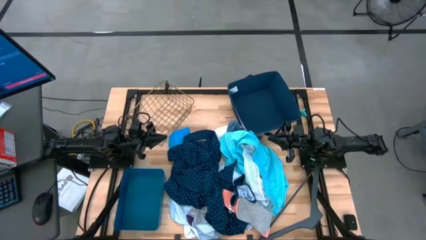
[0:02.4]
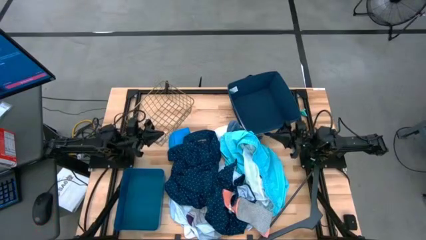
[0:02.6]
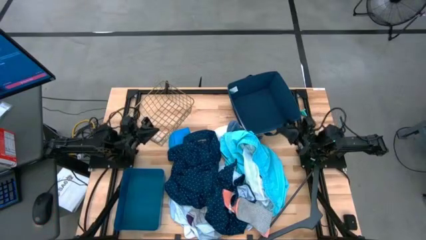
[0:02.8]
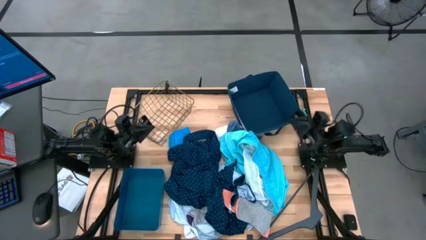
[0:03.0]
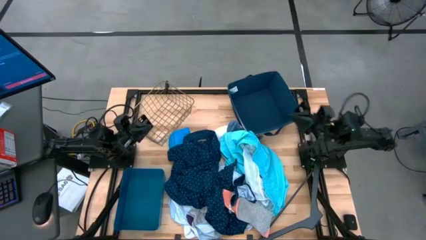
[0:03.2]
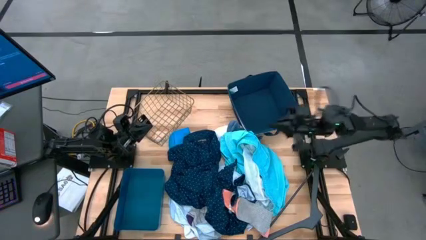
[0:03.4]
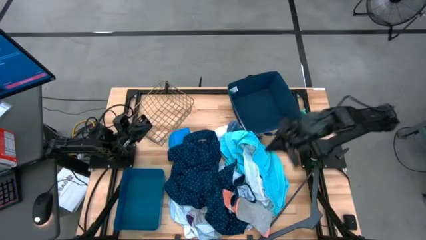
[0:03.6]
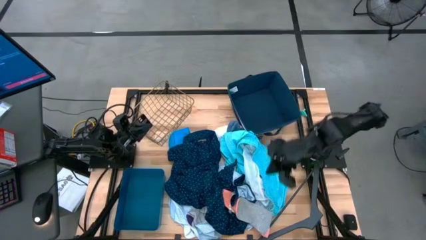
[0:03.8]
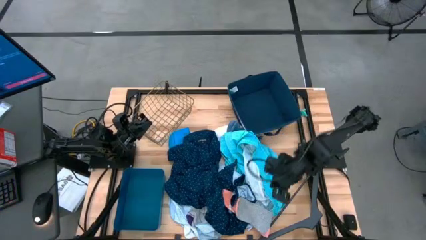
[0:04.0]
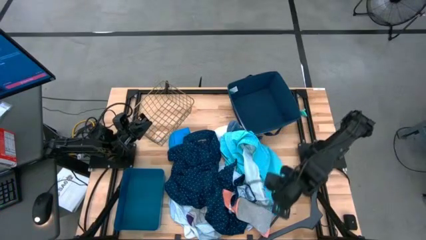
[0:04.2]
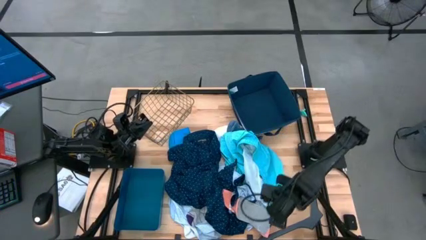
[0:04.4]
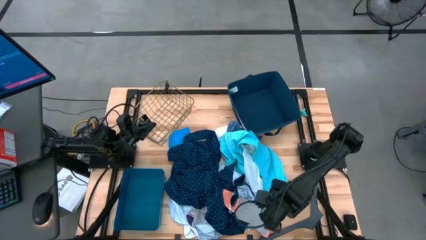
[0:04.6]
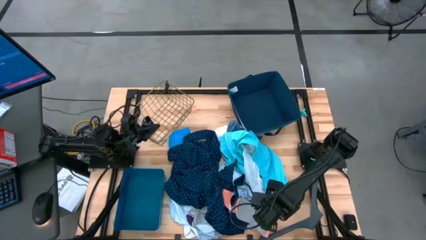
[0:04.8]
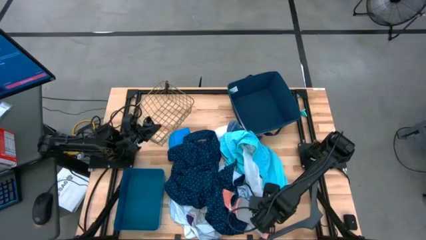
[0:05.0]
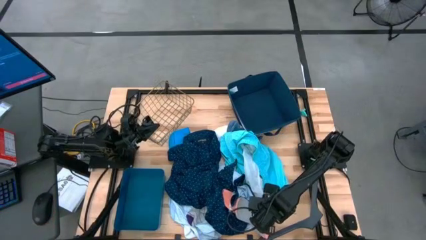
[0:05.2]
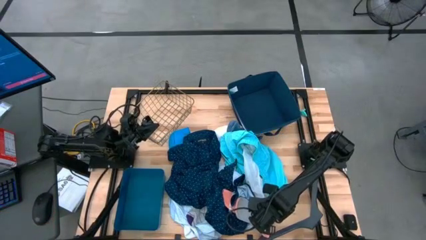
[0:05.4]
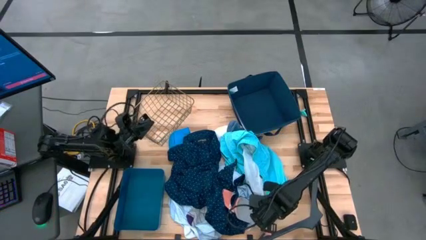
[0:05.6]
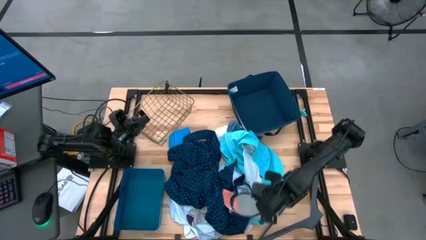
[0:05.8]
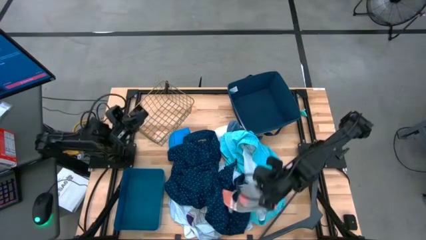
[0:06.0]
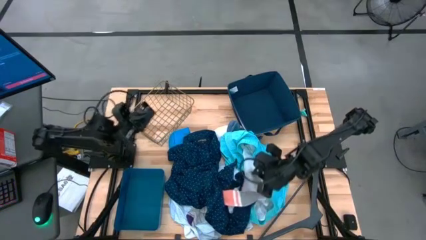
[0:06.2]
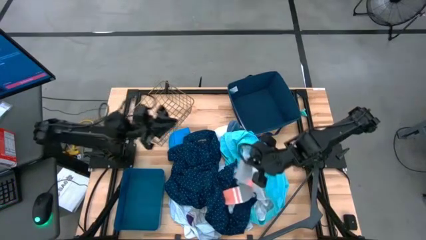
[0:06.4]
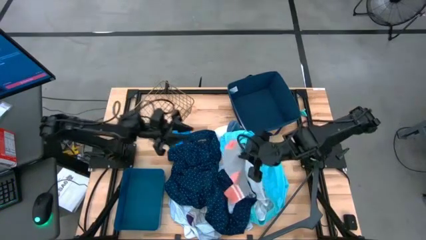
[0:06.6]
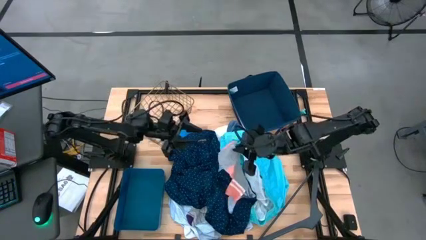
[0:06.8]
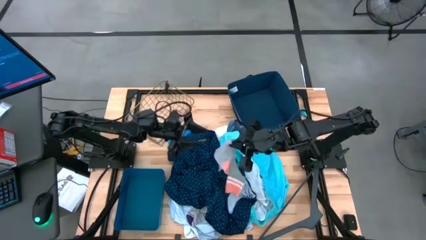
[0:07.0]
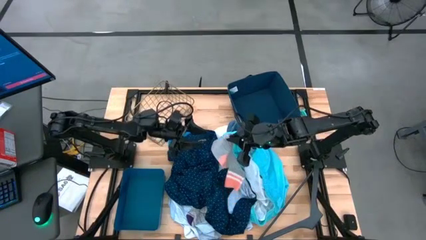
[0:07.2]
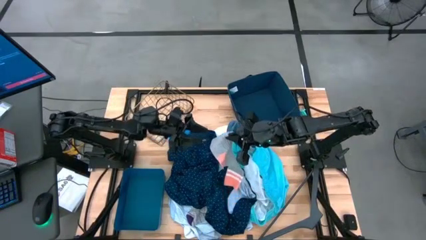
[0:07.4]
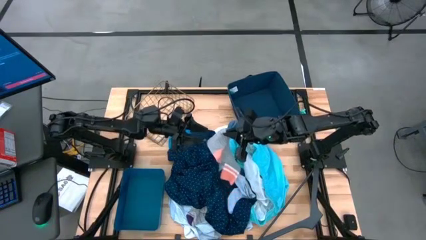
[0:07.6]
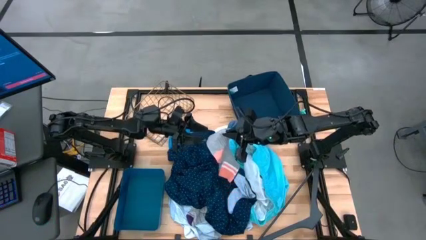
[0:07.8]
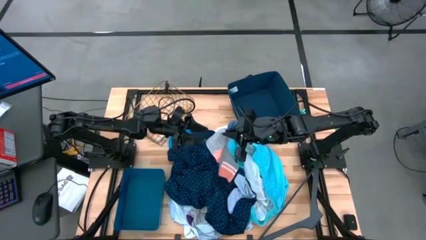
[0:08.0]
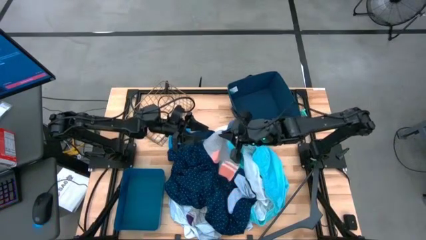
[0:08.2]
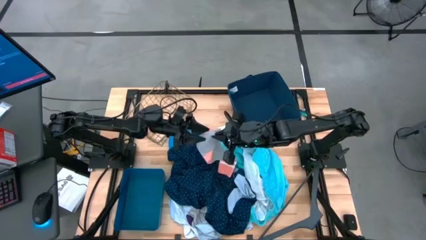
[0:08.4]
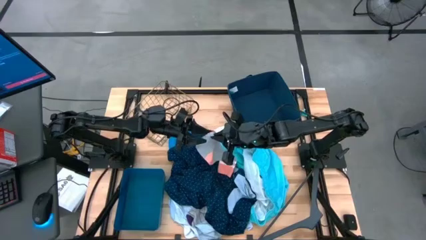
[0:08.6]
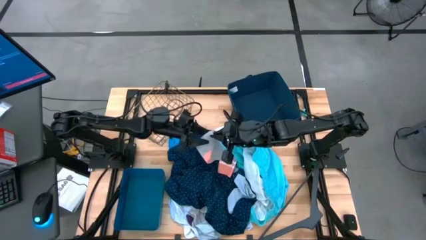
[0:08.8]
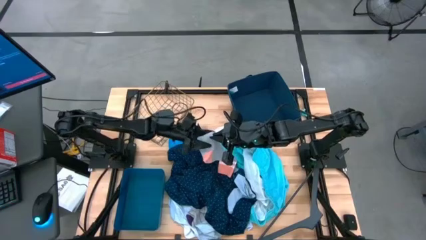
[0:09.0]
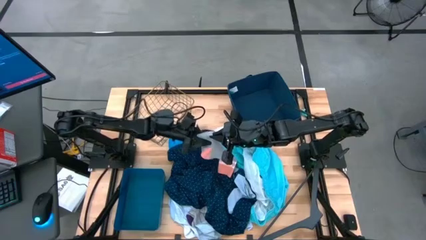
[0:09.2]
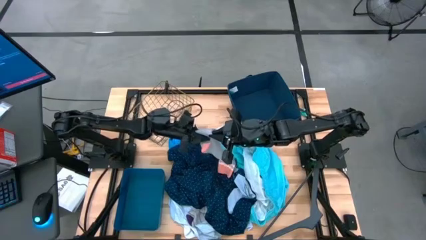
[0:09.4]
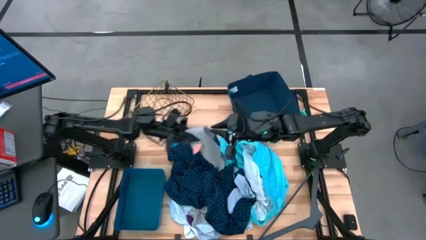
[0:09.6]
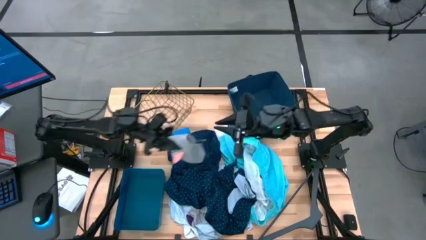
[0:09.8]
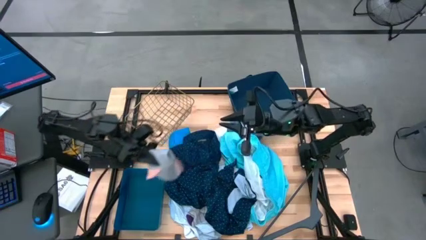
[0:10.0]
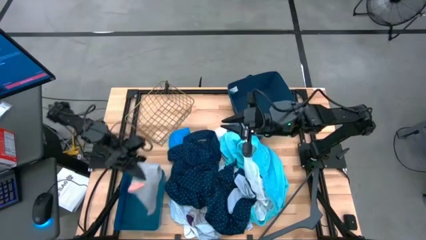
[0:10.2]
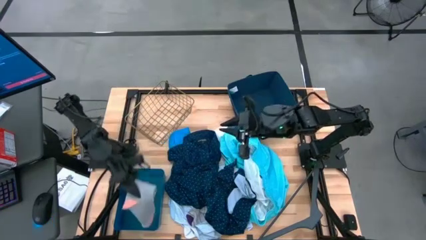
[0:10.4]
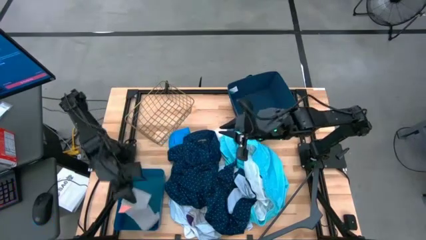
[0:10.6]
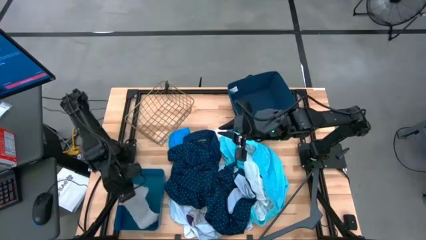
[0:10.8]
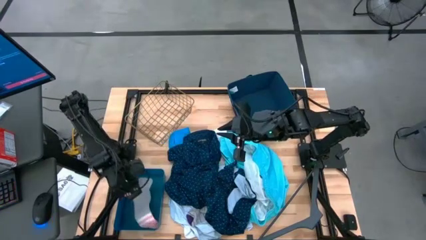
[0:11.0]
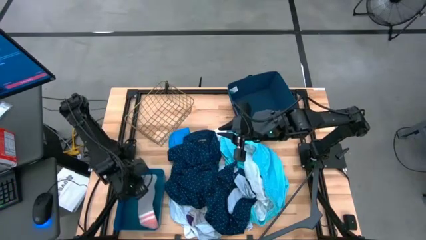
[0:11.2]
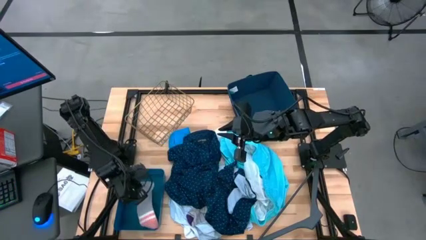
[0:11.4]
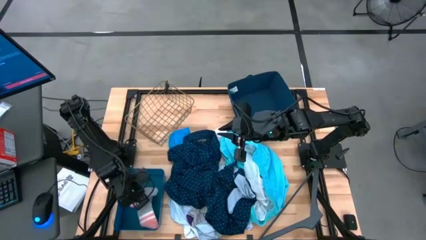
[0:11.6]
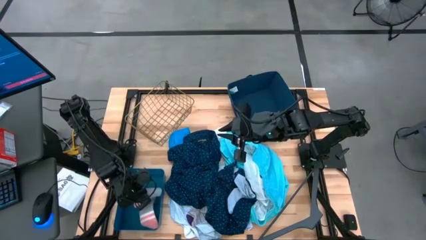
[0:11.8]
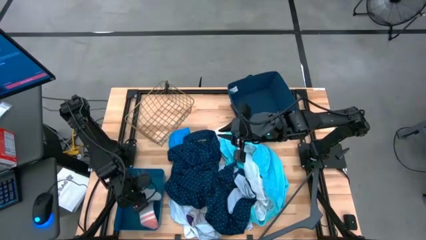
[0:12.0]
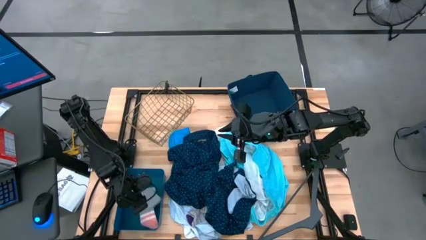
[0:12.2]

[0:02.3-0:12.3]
Task: Pick & Place Cloths
Put the gray sock into the blue bin

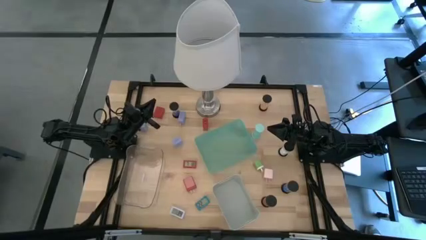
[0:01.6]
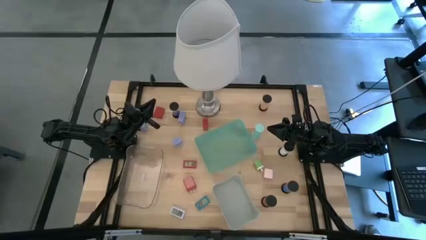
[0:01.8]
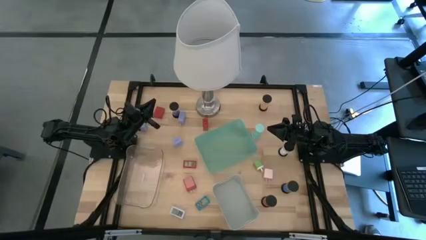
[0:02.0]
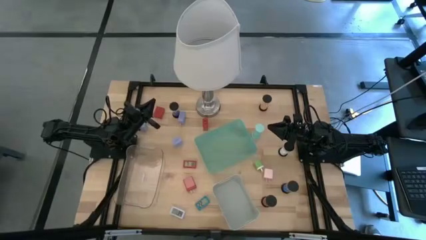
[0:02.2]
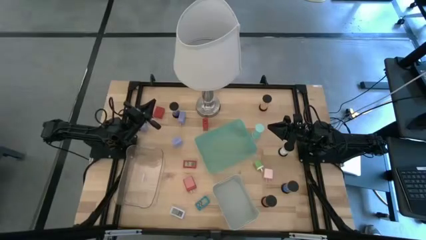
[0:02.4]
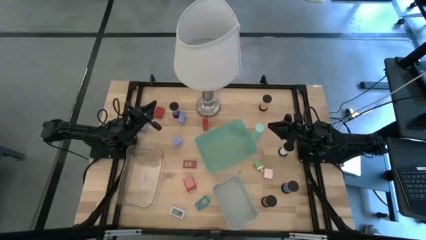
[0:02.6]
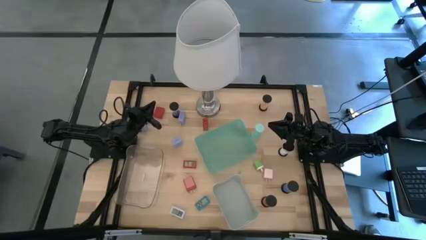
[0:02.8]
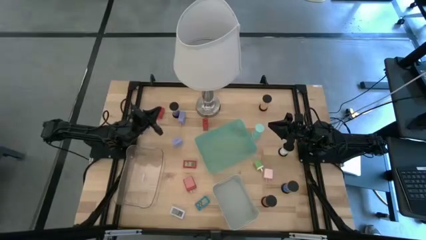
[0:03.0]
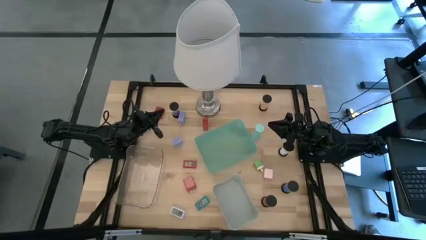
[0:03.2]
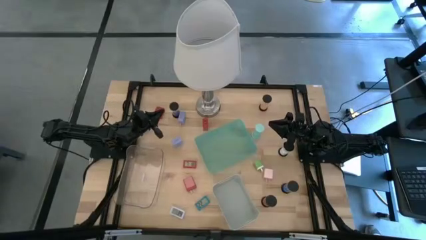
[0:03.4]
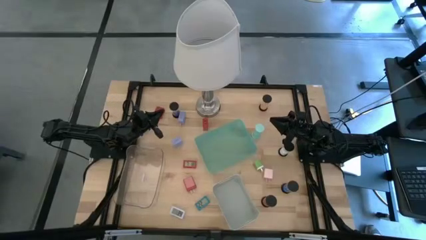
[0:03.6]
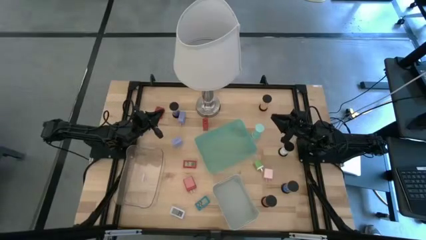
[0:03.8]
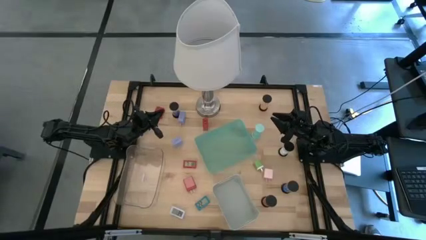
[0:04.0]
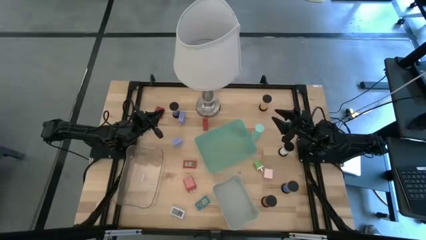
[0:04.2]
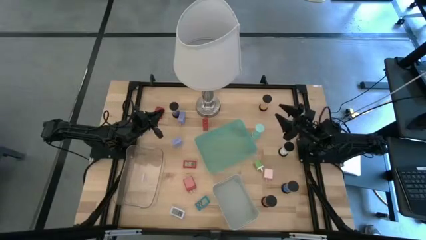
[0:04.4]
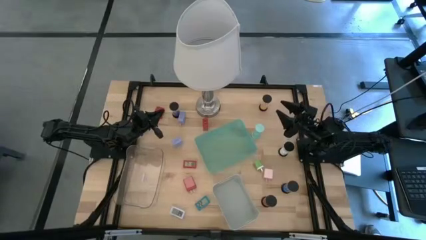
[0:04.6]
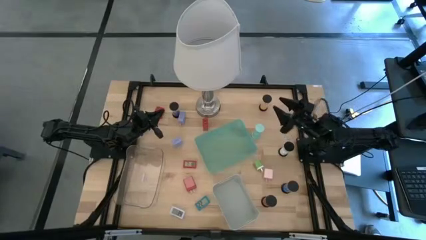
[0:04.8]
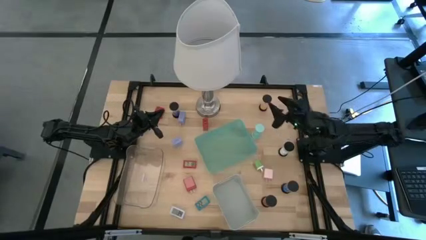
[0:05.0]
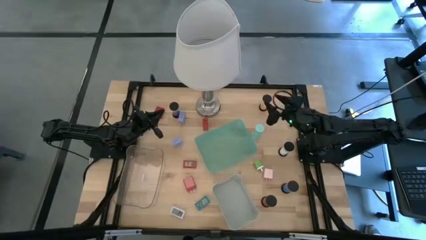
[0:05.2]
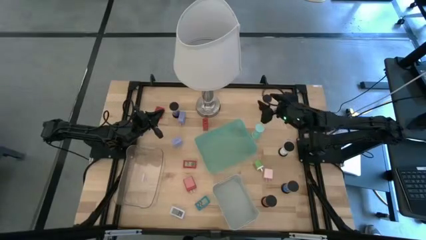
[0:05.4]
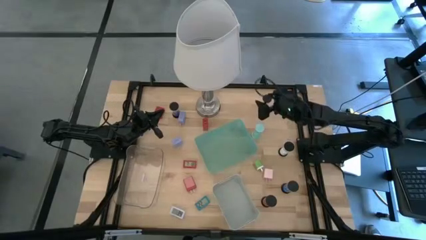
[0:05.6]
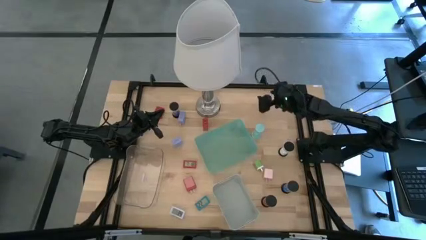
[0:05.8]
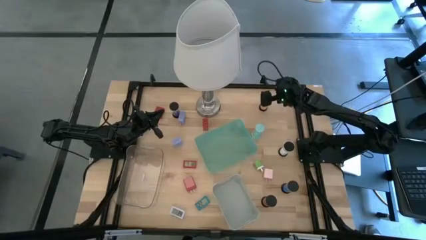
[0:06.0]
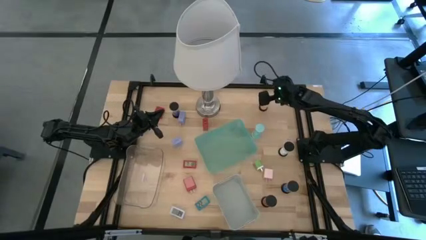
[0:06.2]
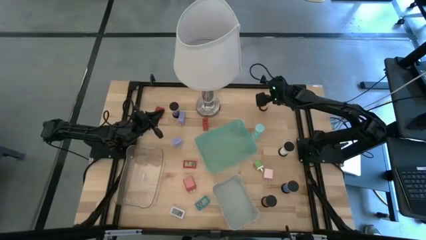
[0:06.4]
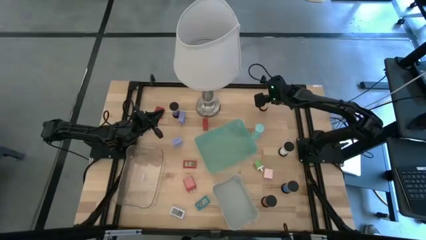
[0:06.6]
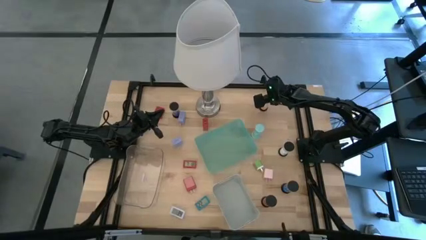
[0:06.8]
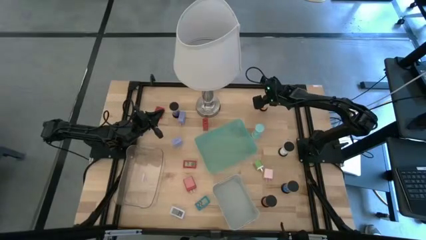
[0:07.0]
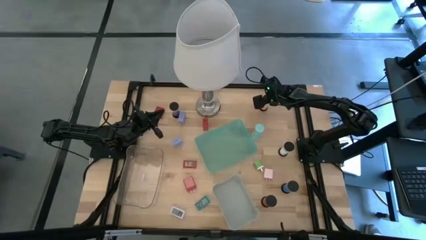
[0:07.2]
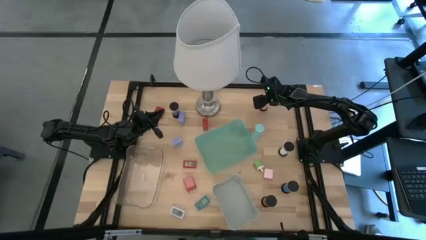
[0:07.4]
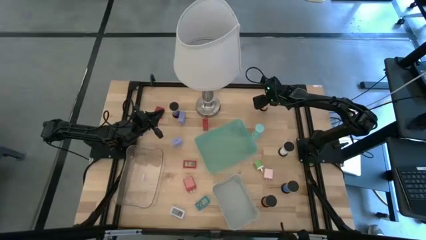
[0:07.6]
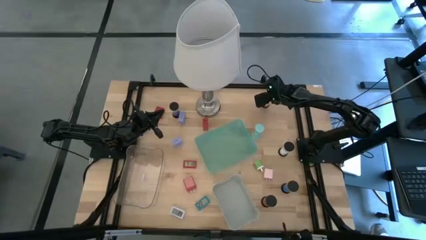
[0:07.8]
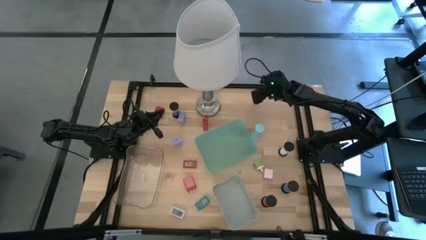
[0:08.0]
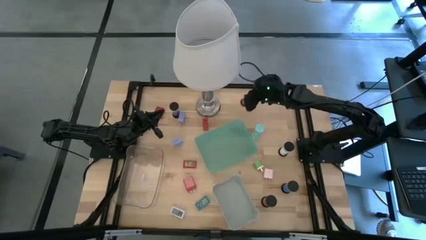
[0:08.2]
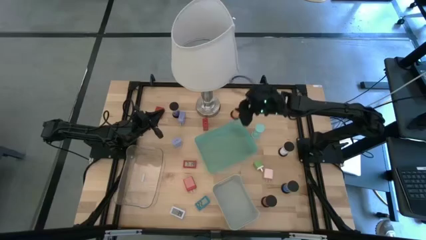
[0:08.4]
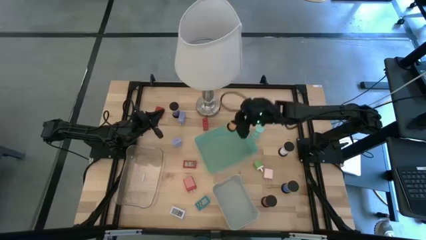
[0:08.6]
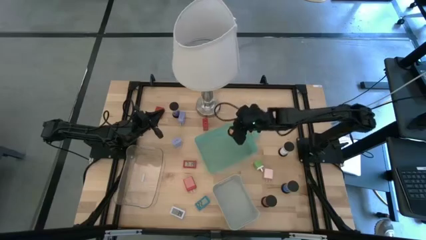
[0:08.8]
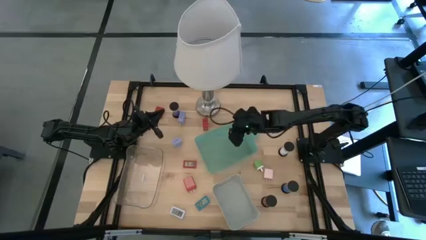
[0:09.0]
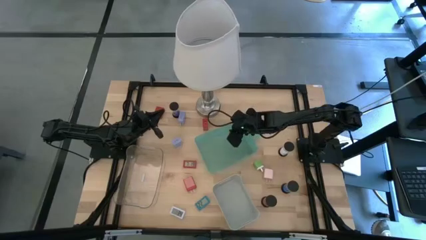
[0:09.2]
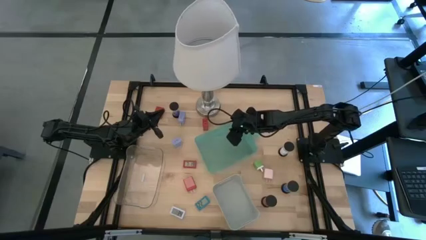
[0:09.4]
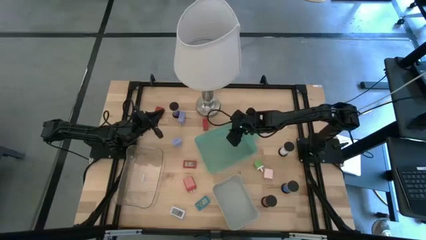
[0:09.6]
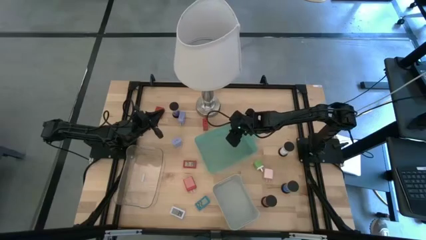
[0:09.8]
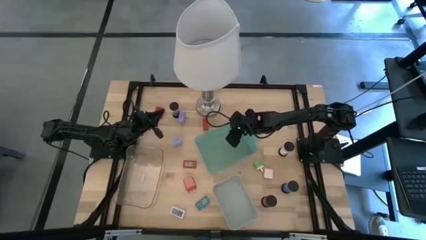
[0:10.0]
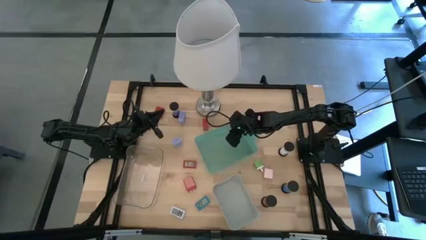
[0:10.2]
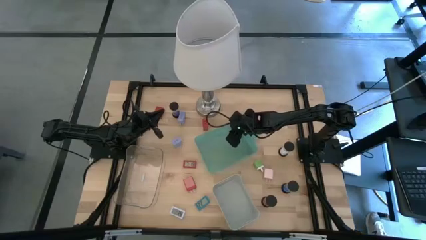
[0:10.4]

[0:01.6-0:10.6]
Task: Pick & Place Office items
Put the orange hourglass into the green bin
